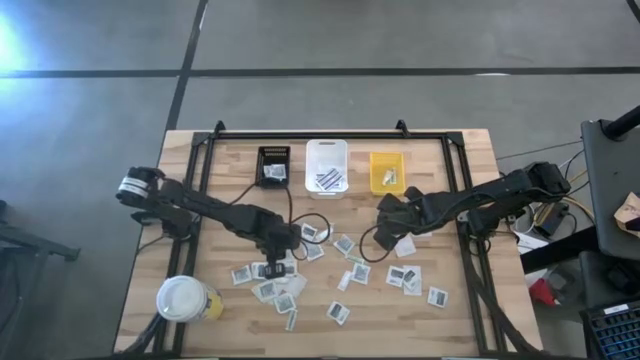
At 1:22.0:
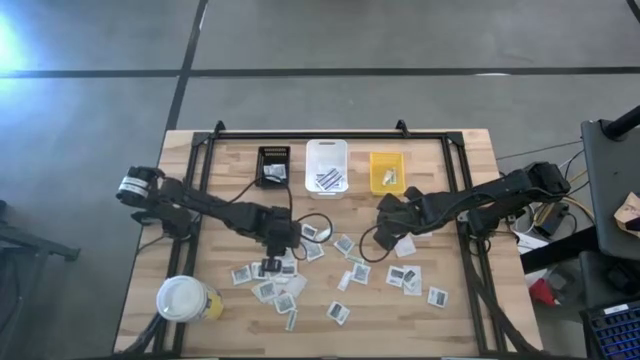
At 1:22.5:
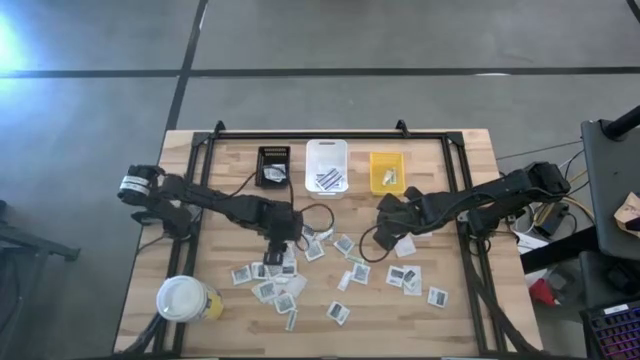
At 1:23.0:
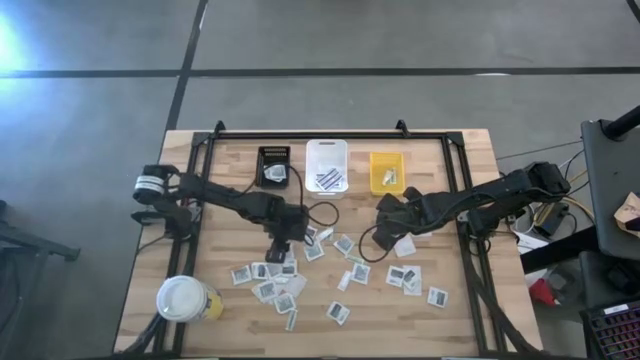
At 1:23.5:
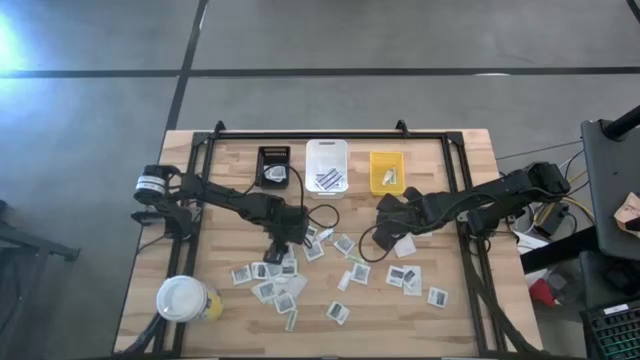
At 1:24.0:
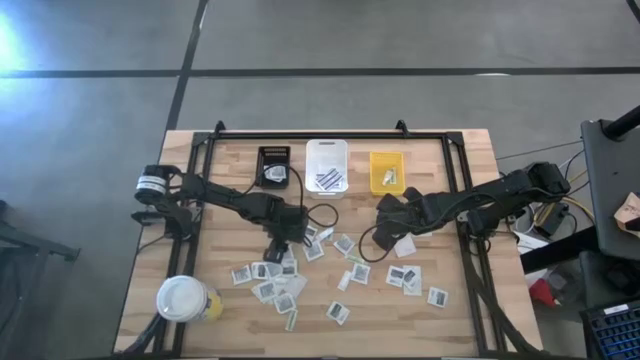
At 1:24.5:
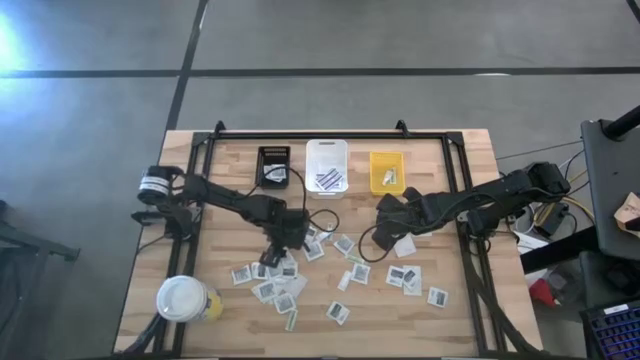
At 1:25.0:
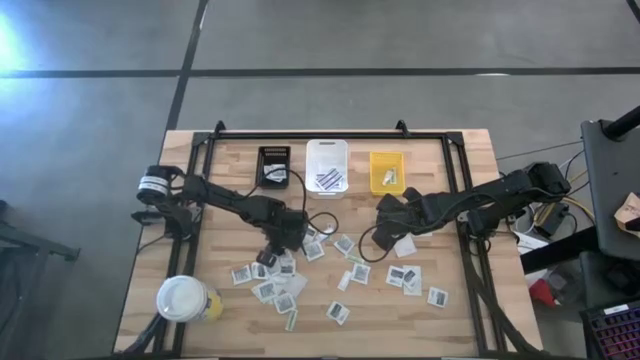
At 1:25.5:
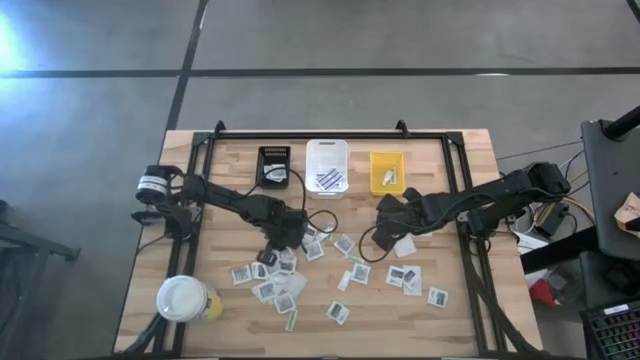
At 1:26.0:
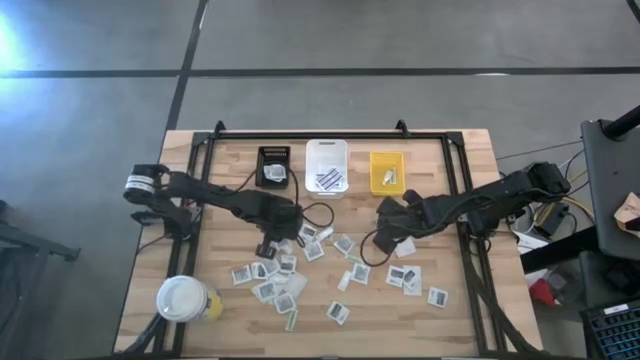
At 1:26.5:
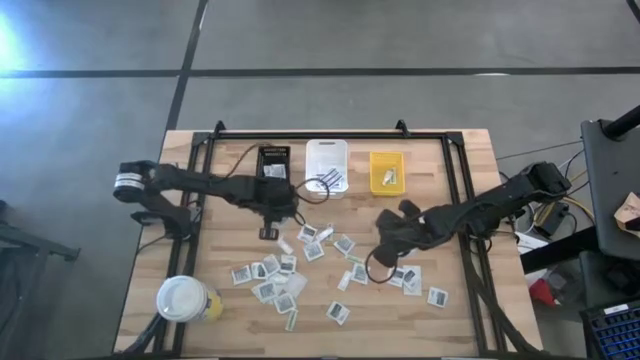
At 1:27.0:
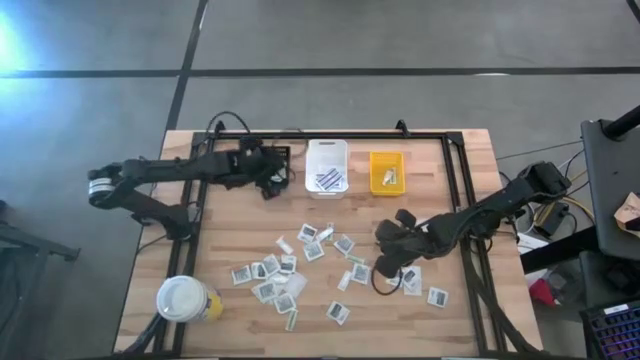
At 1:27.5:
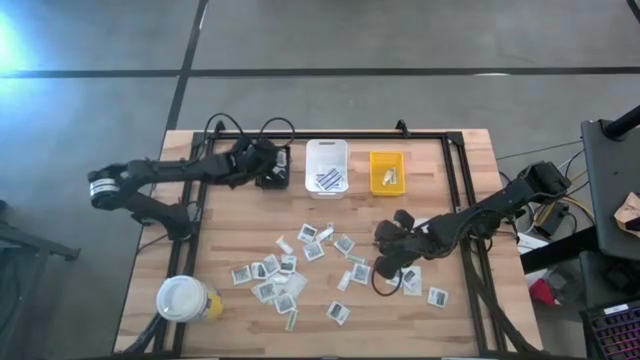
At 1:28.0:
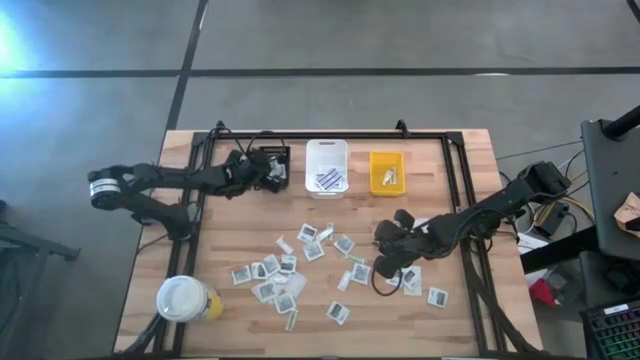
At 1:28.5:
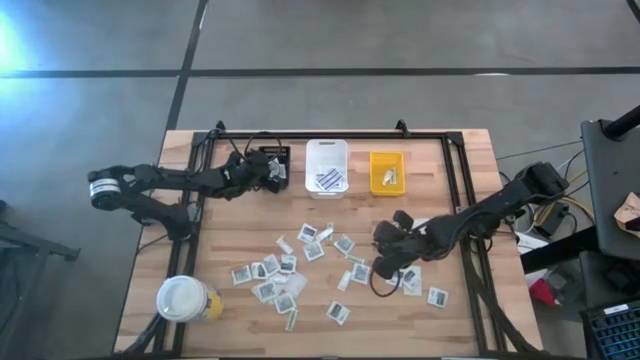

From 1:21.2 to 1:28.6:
Task: Pick & Place First Aid Supplies
Put the towelette pack into the black basket

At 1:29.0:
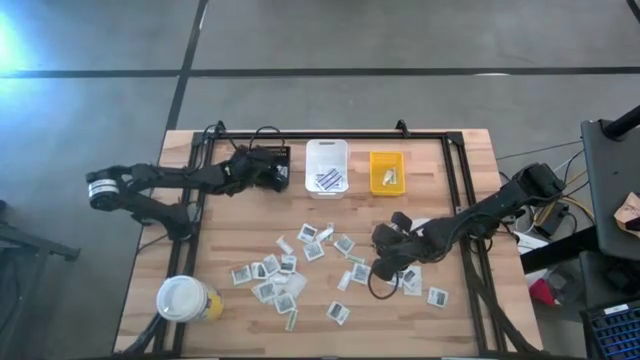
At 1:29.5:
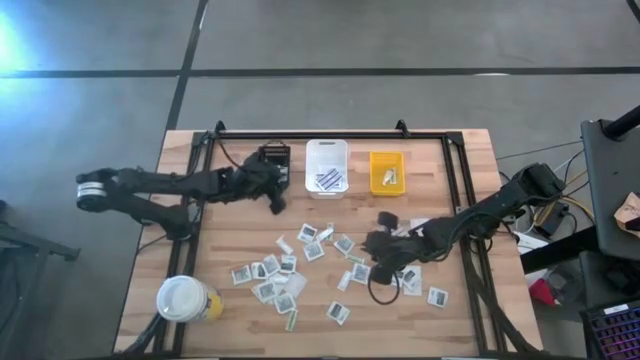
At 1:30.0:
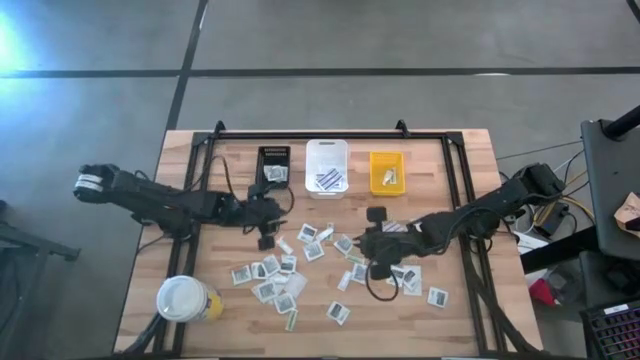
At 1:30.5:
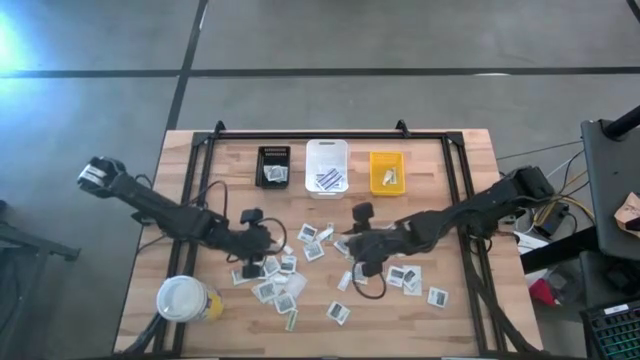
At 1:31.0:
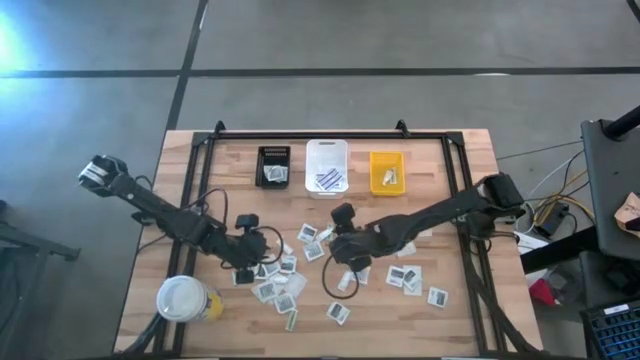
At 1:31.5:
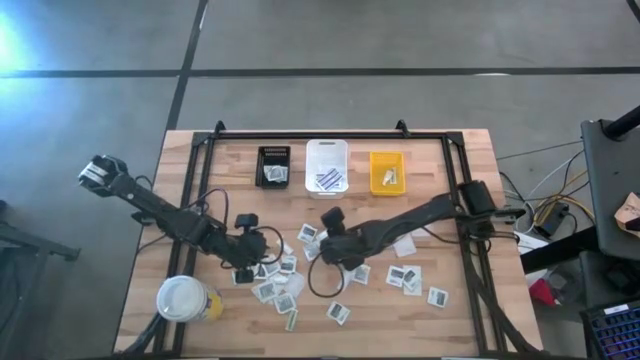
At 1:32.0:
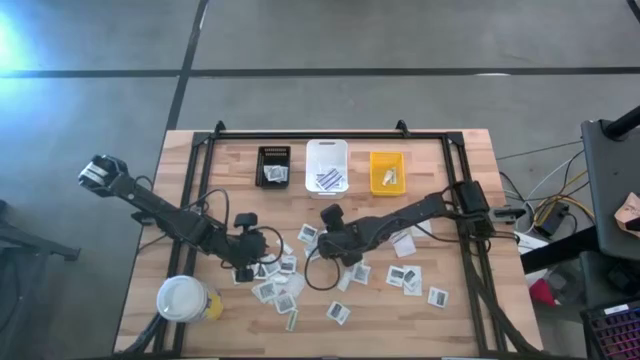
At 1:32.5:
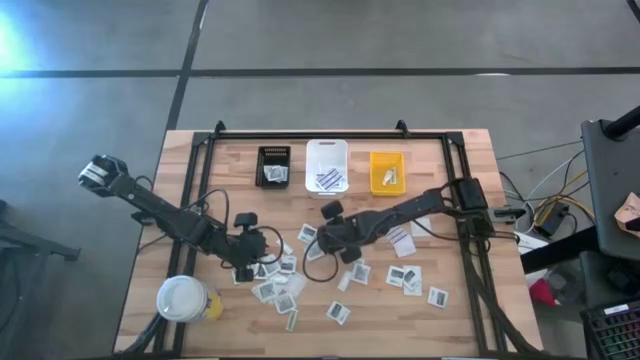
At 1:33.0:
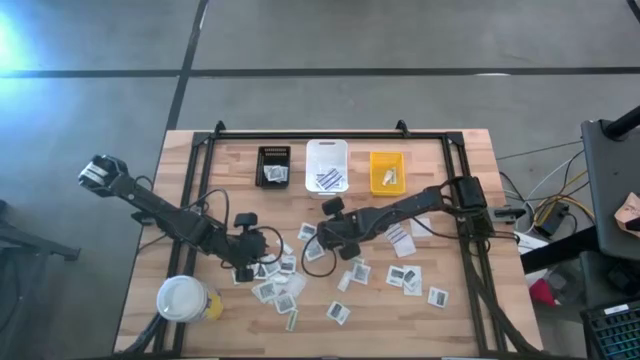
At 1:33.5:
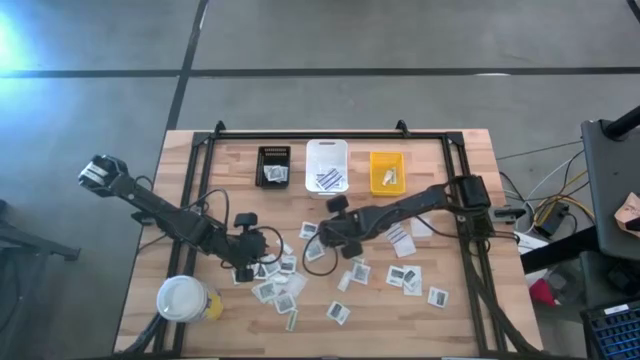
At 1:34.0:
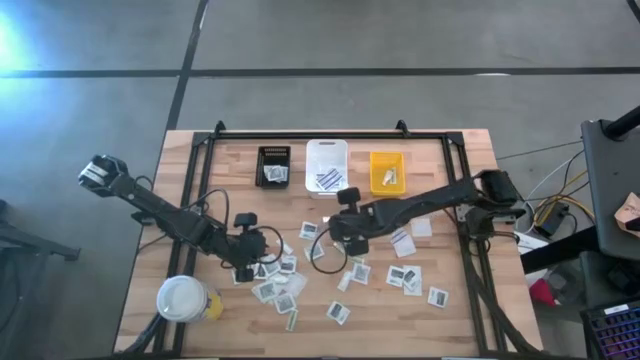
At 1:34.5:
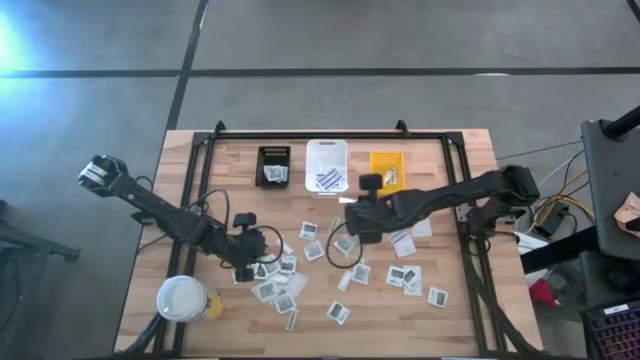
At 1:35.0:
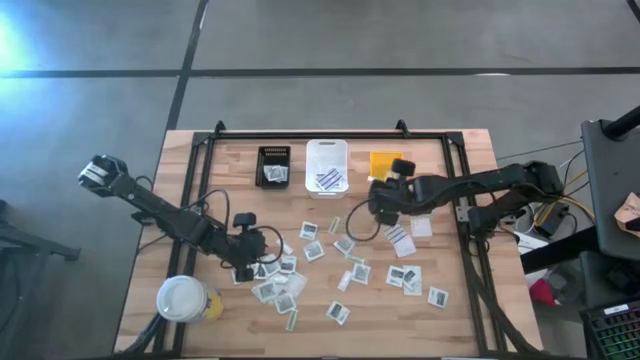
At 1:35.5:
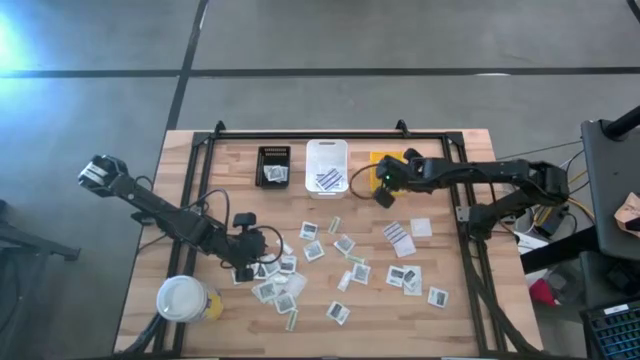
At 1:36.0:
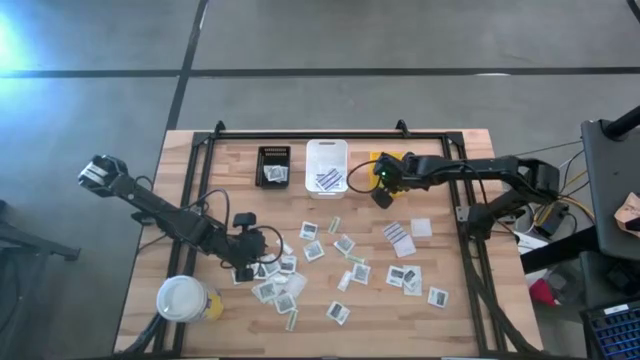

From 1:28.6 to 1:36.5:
Put the green bandage into the yellow basket

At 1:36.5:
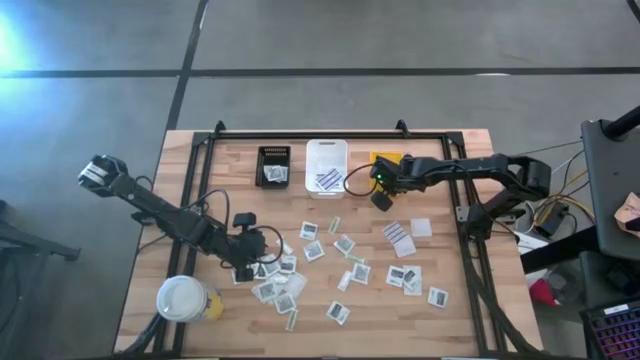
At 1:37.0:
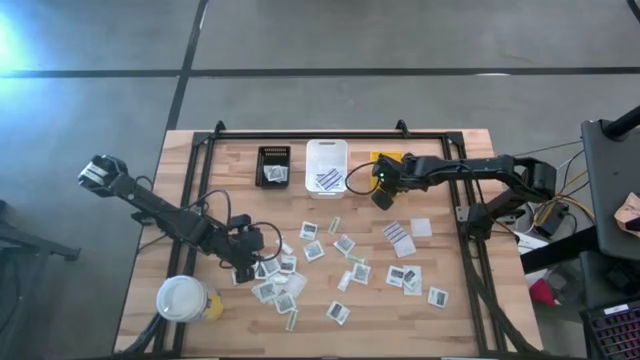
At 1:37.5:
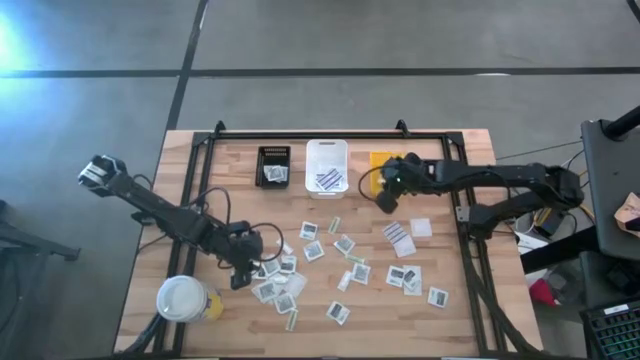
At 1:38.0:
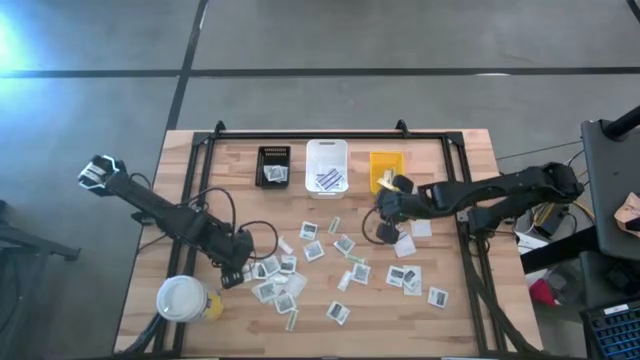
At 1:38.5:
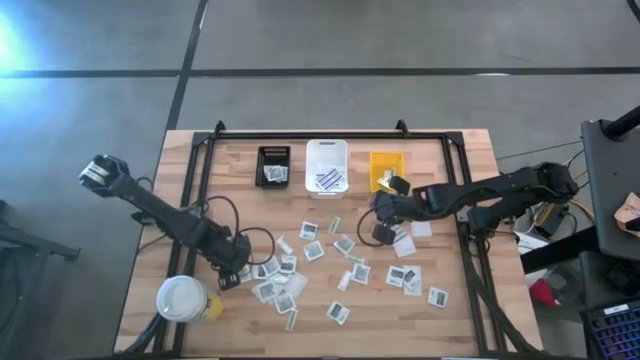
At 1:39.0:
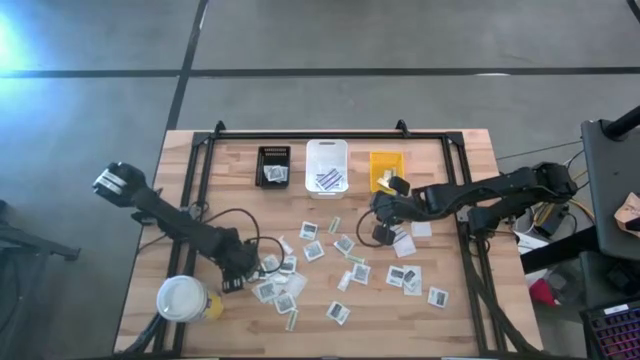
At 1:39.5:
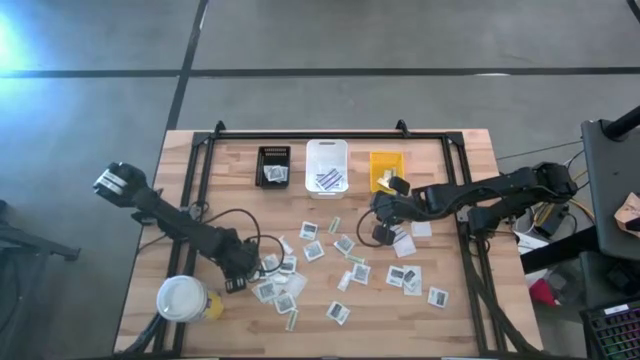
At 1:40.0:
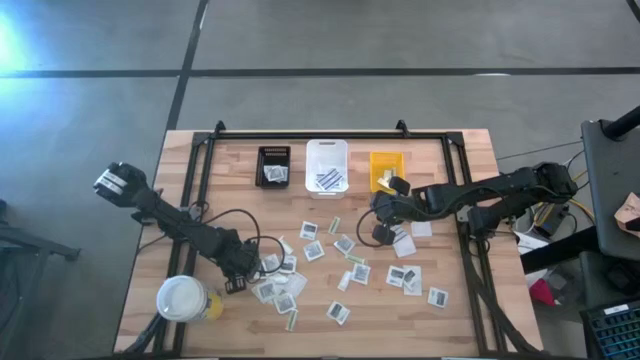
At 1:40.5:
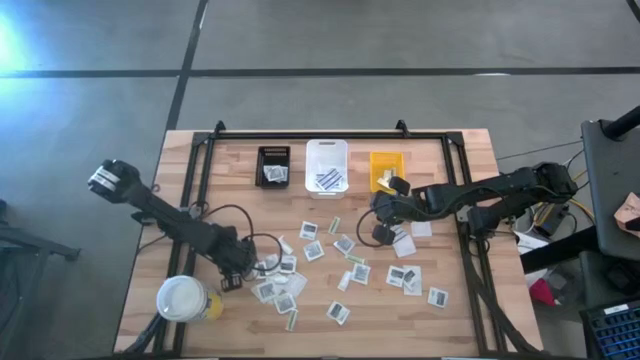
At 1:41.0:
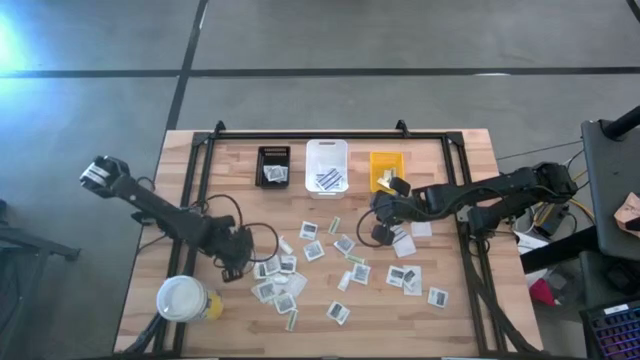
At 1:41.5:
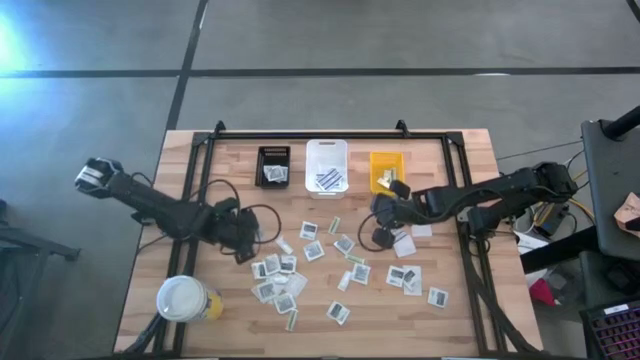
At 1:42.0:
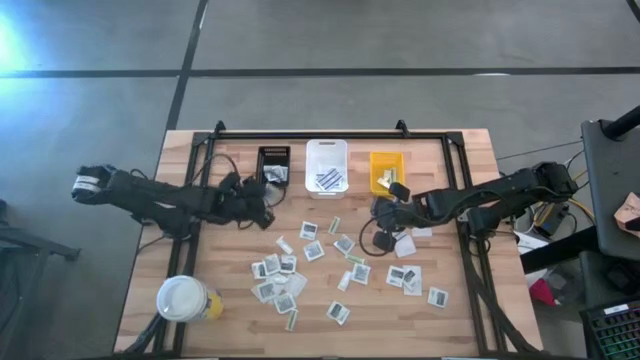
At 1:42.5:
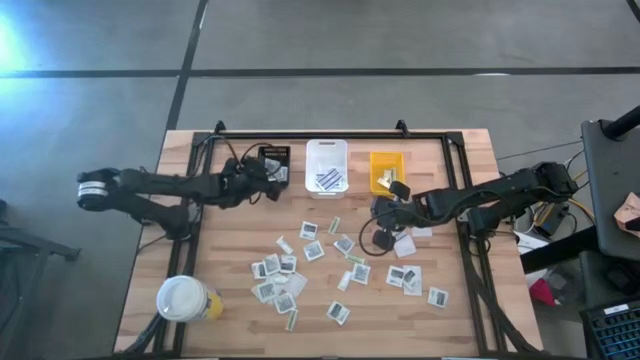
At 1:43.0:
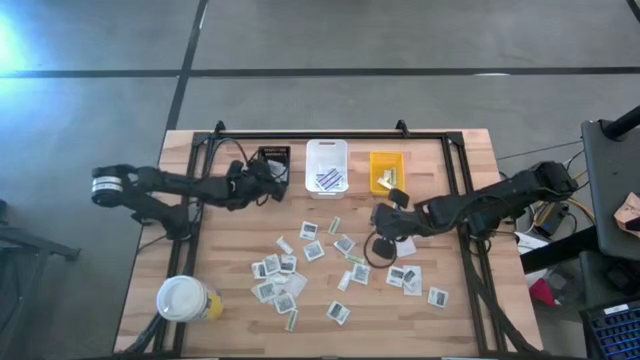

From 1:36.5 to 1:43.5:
Put the towelette pack into the black basket

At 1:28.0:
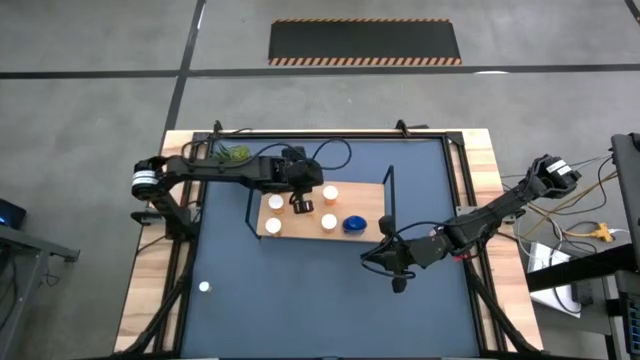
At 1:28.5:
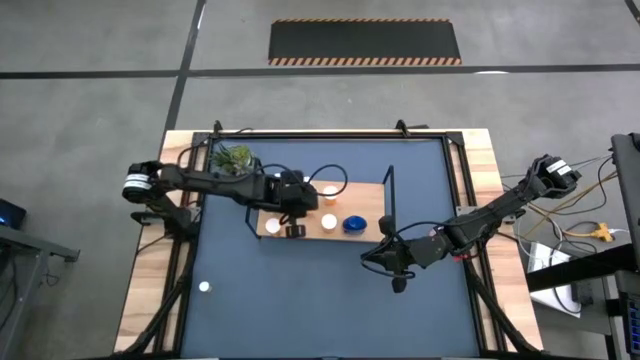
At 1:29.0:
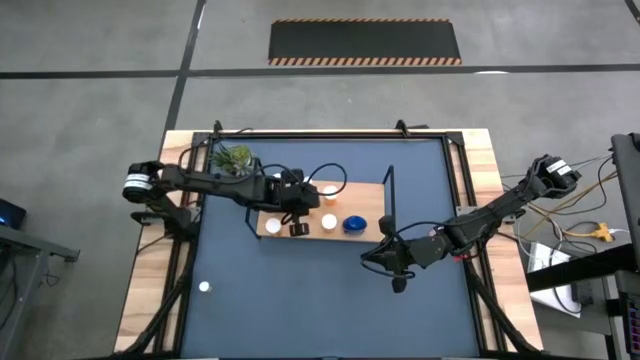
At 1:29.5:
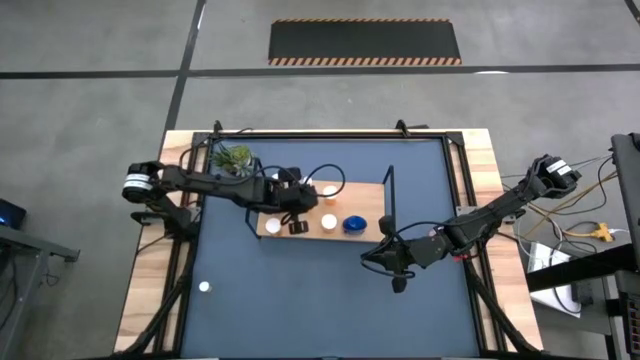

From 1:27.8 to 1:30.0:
Task: Pick and place medicine bottles onto shelf by color
Adjust the small orange pill bottle on the shelf
